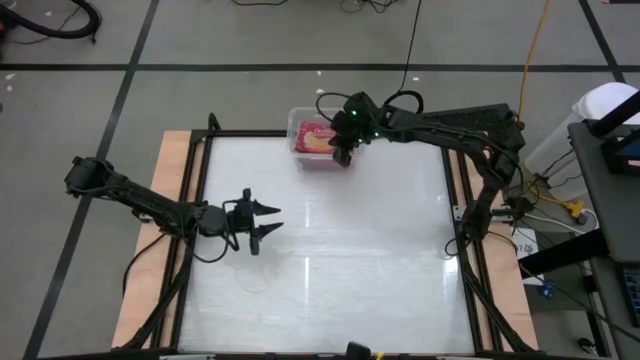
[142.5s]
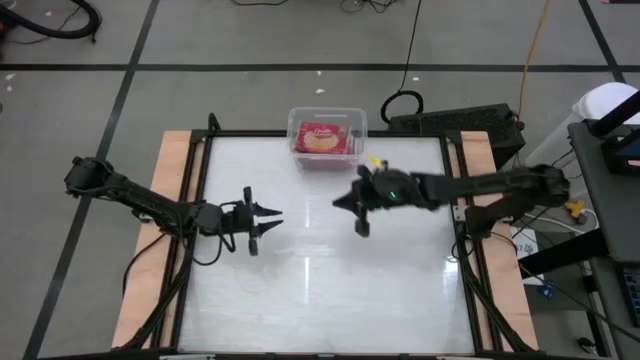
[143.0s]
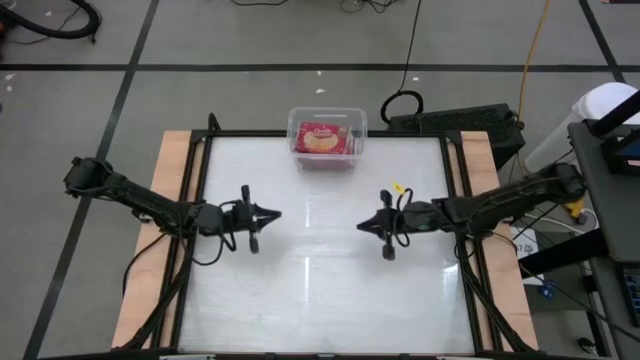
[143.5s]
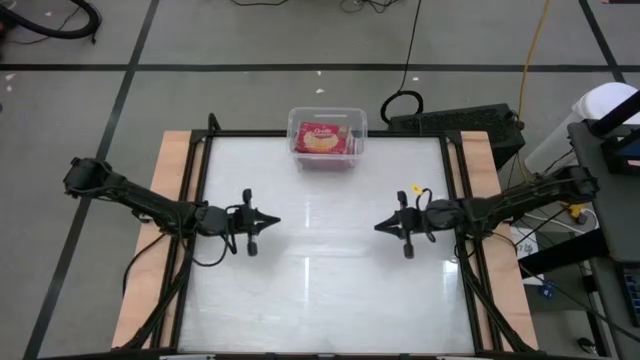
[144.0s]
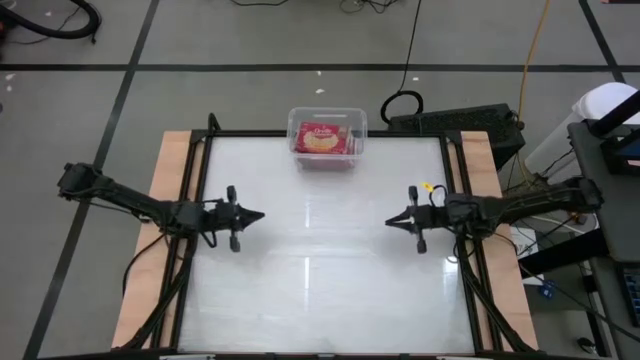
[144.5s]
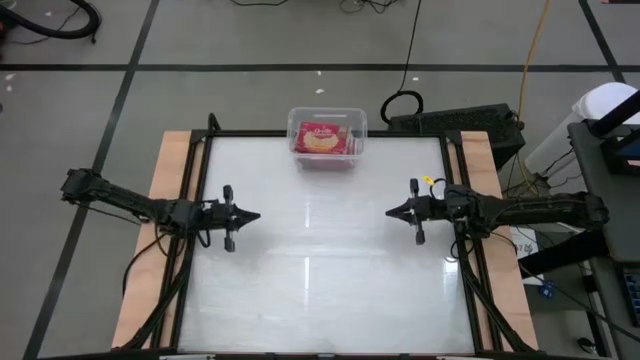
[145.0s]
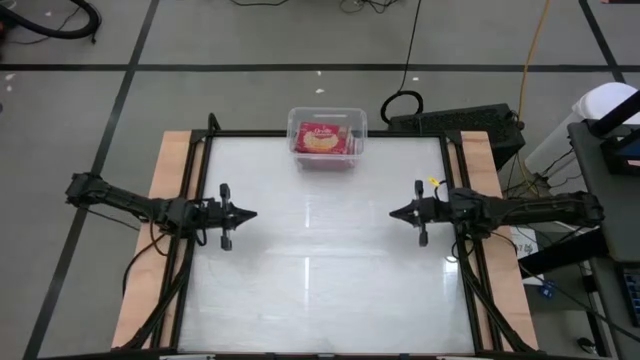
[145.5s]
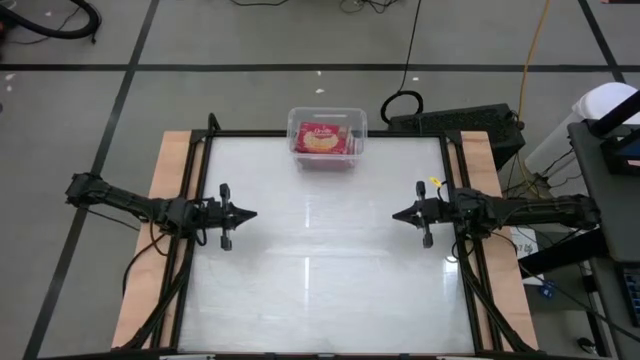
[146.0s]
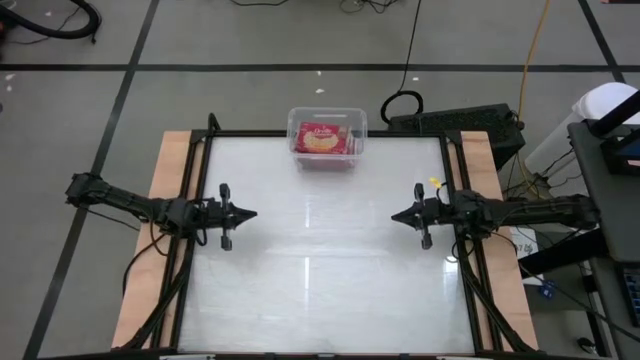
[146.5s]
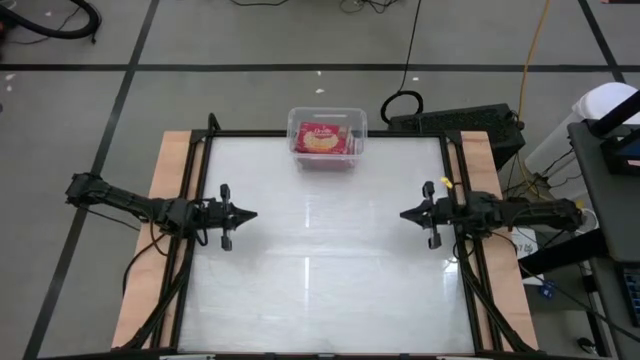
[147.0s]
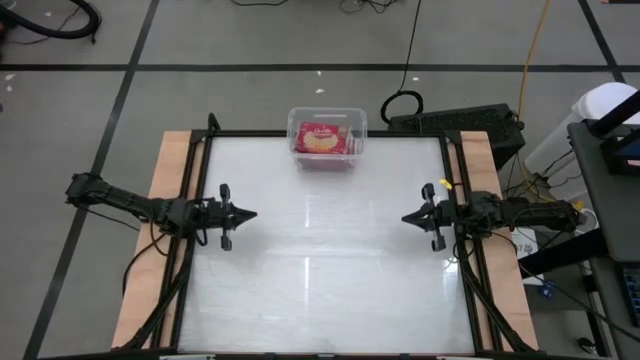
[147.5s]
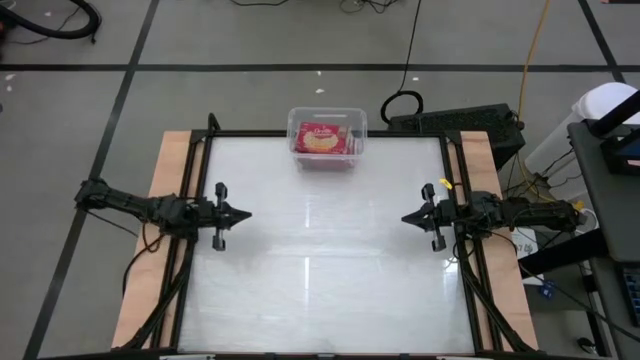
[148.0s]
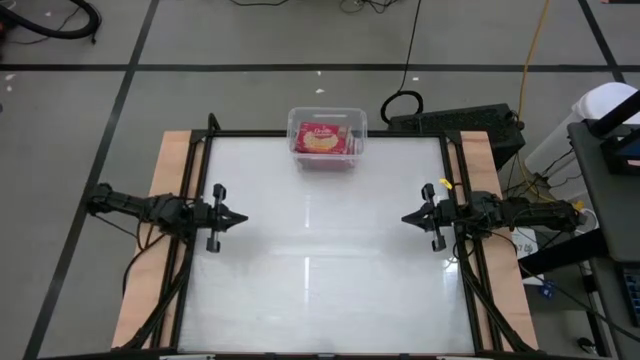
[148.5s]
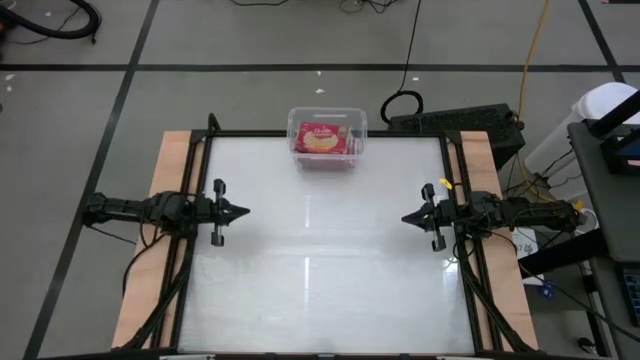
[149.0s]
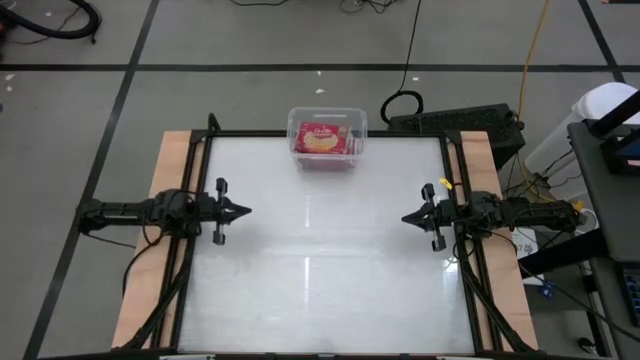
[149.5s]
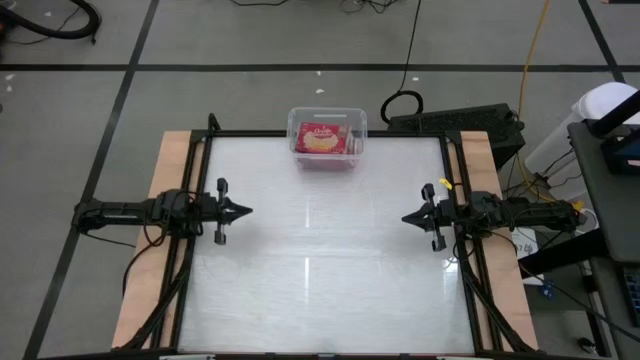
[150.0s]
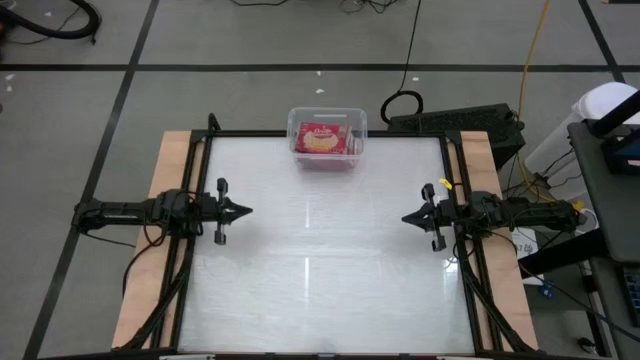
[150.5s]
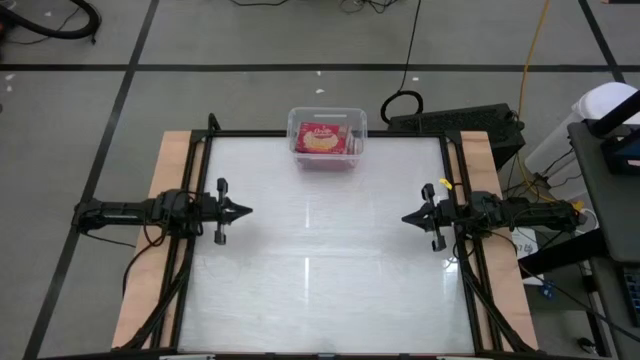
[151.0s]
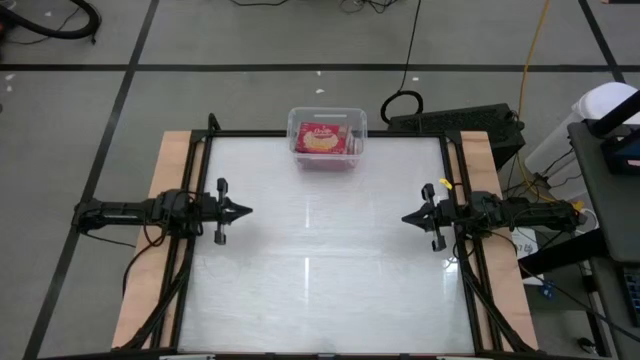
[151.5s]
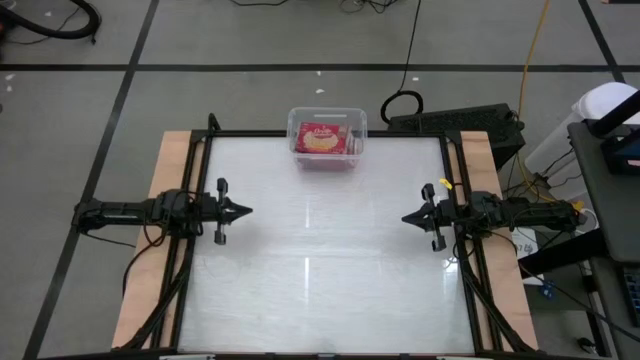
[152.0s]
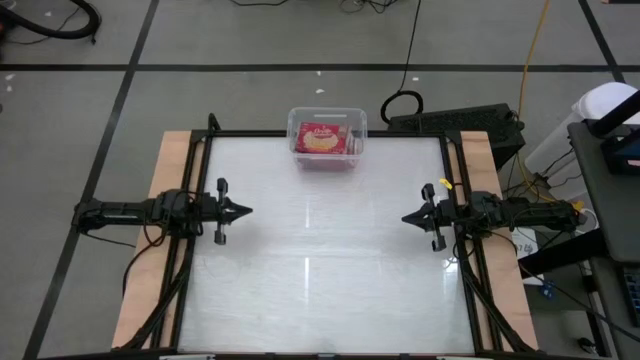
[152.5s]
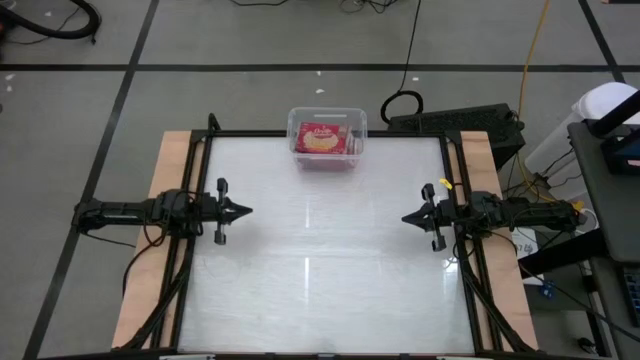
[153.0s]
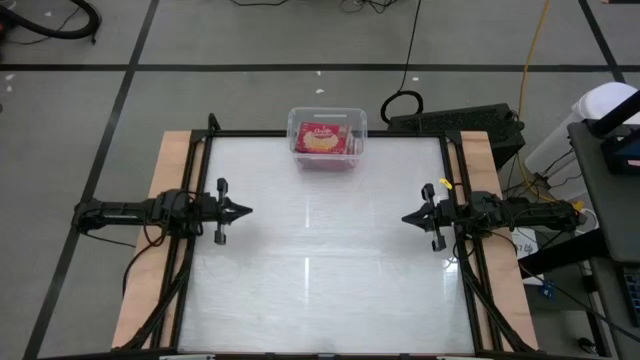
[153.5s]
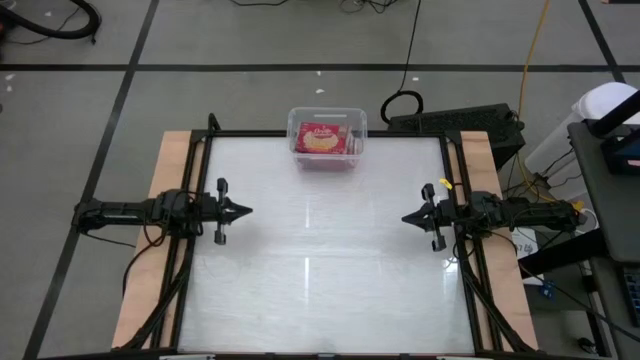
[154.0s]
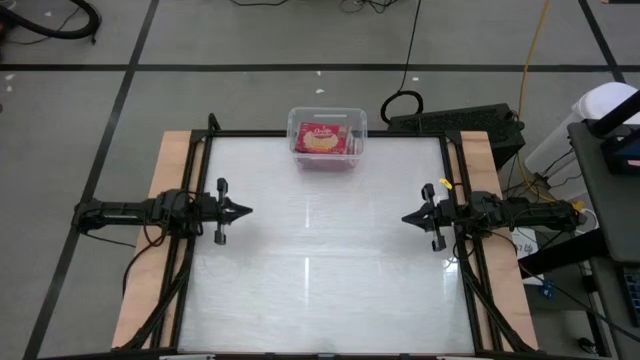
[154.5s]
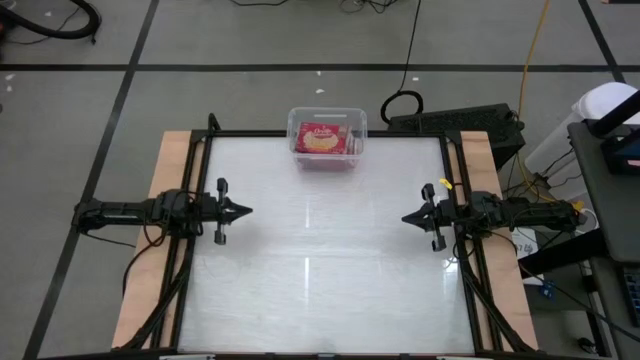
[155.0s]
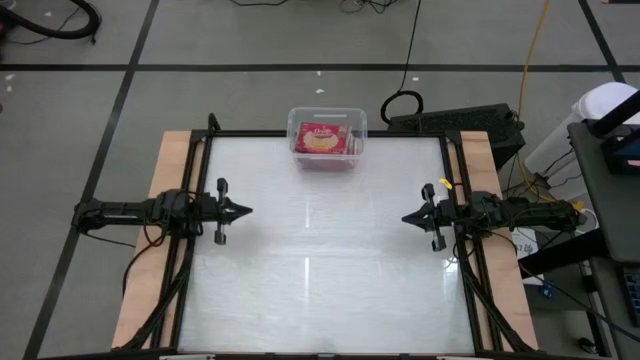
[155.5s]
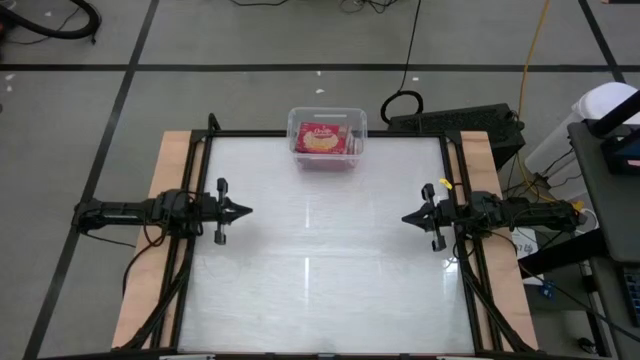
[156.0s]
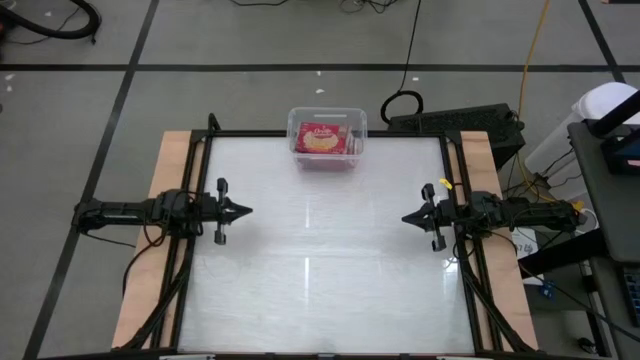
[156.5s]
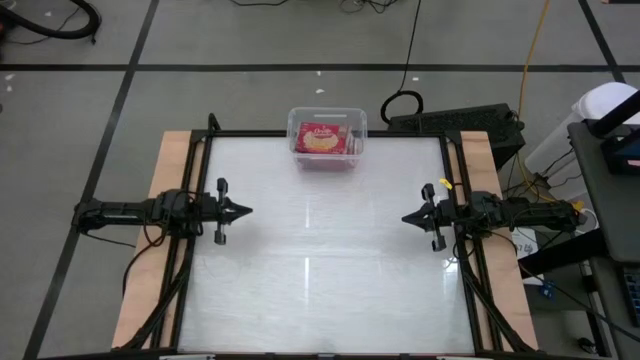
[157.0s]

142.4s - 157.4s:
Task: Sort popcorn bags into baskets
Return to Home Position

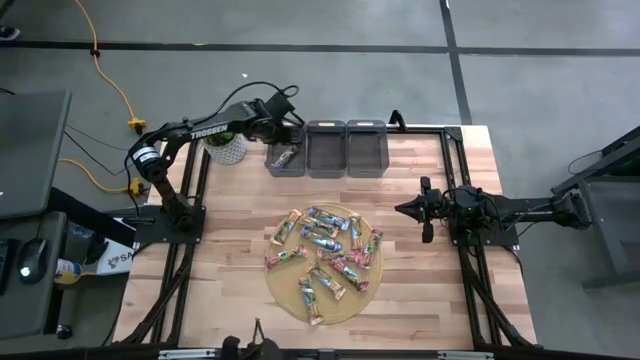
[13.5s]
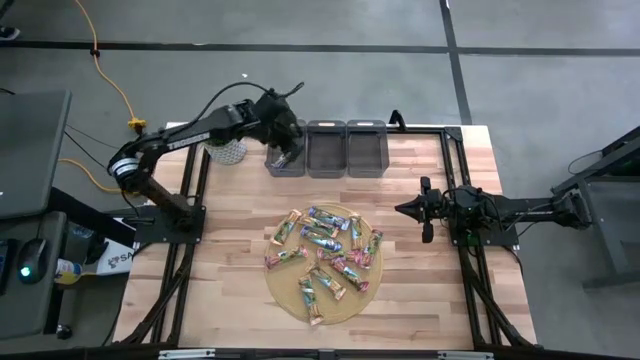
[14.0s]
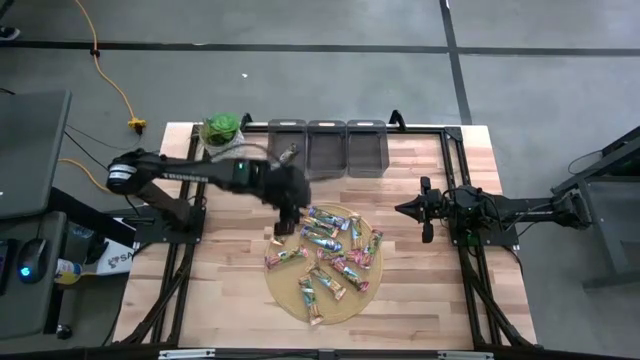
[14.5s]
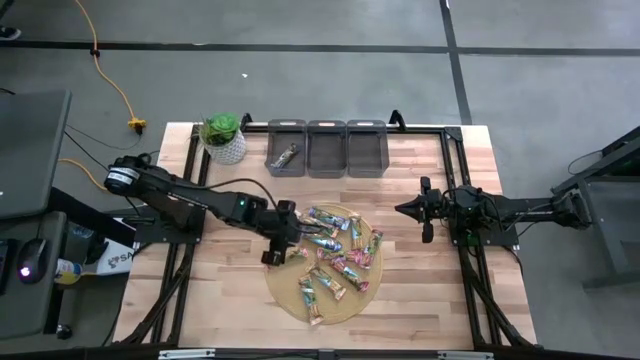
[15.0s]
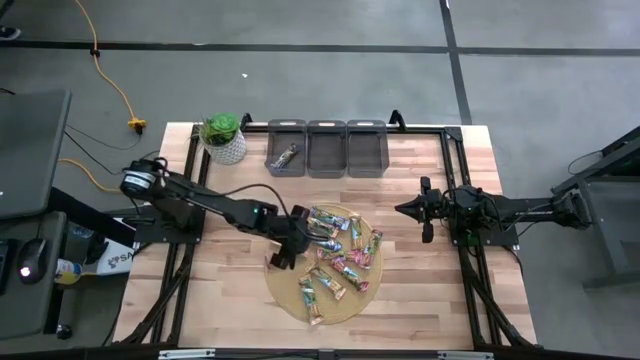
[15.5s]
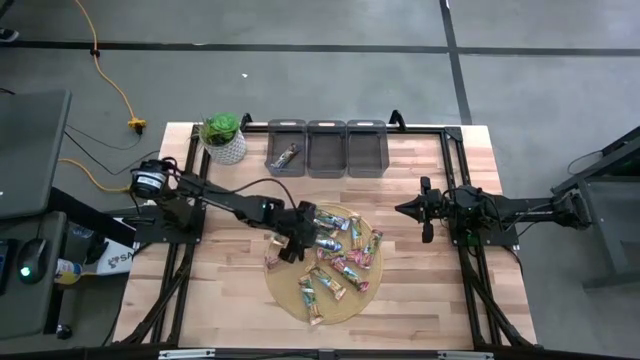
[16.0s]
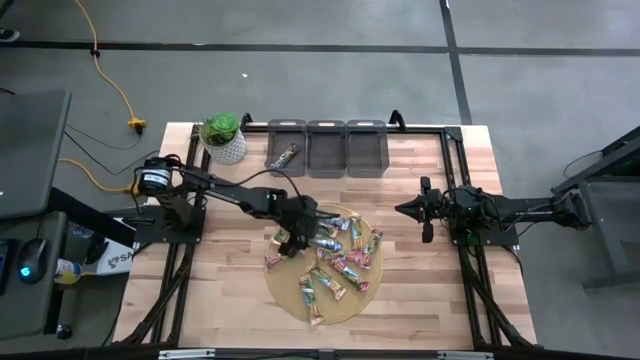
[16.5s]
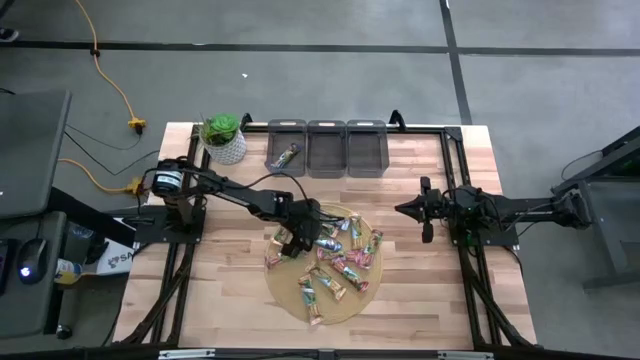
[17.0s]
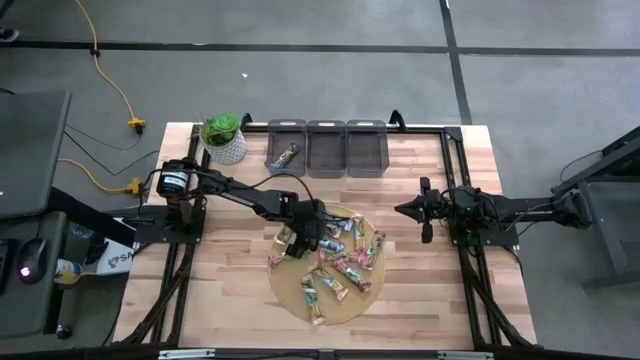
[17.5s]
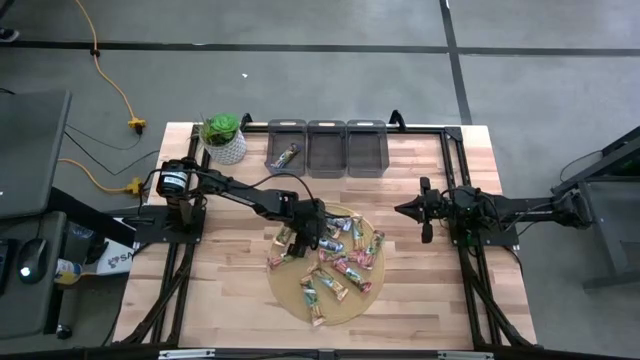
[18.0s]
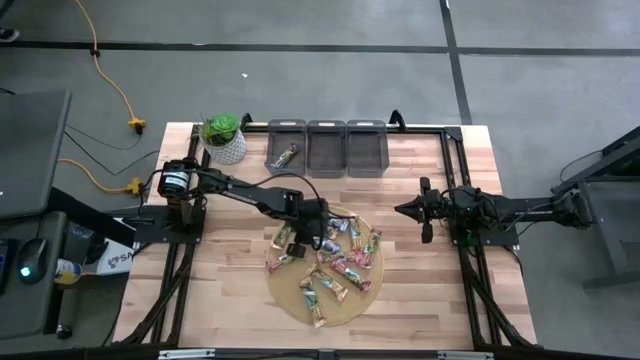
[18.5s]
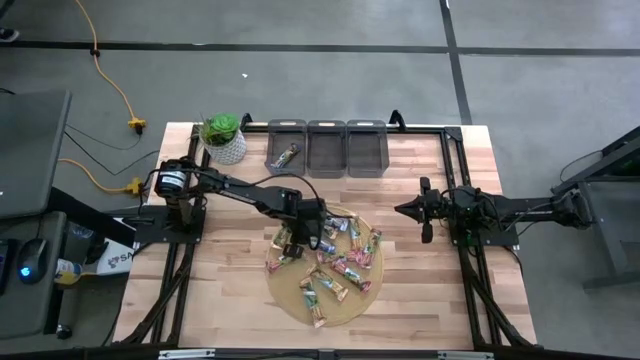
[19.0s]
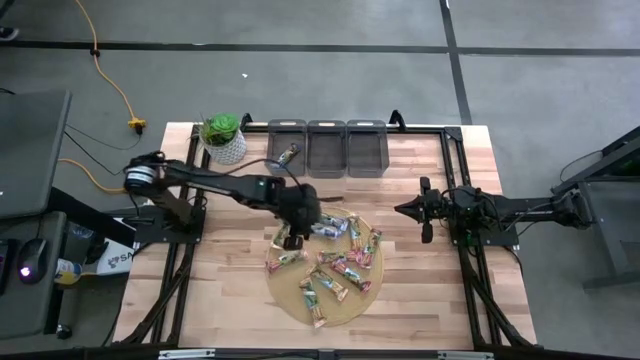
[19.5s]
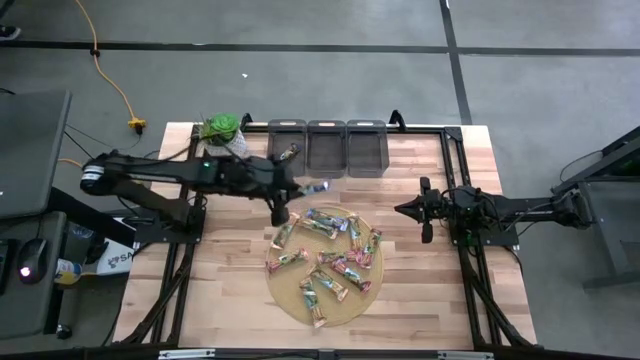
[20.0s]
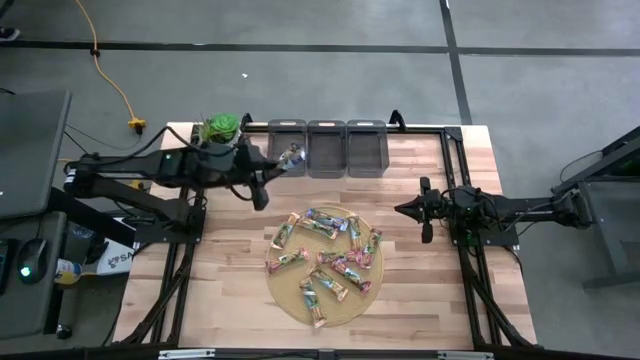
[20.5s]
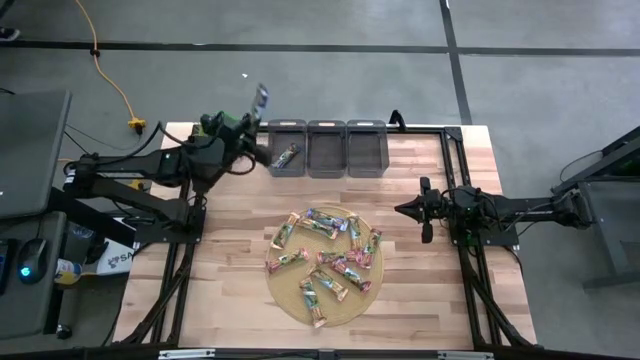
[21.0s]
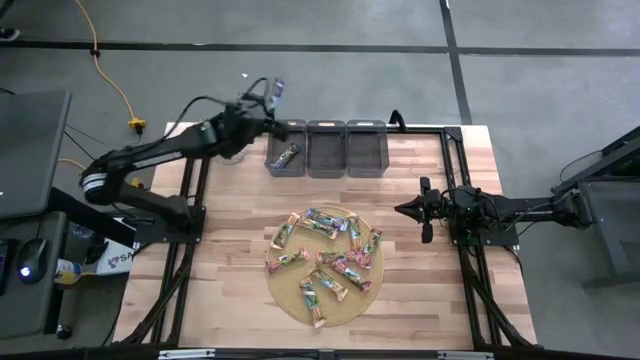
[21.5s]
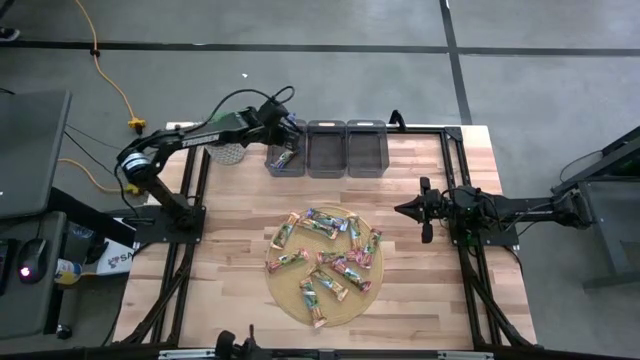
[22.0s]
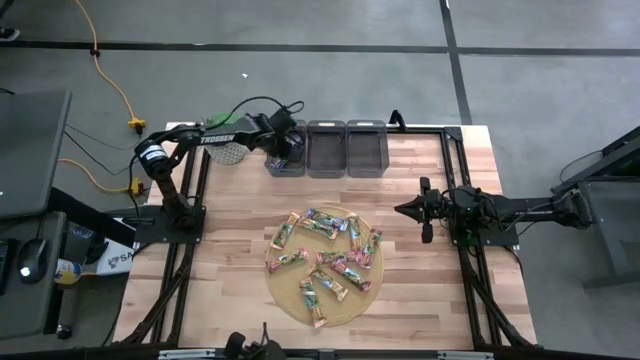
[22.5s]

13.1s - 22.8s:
Task: Pick and place Granola Bars by type
Put the blue granola bar into the left black bin
